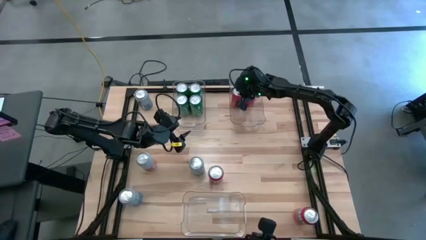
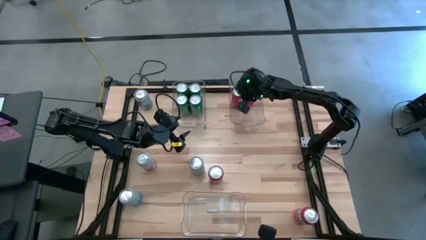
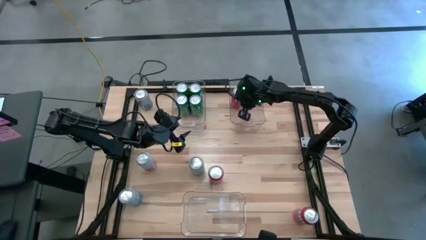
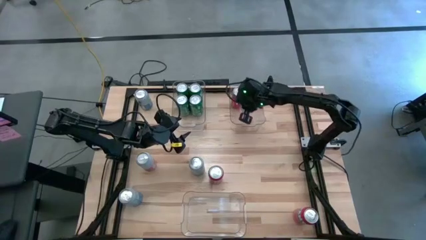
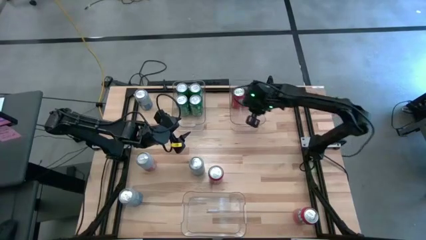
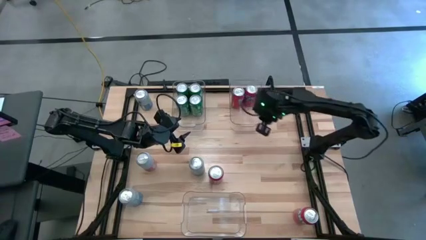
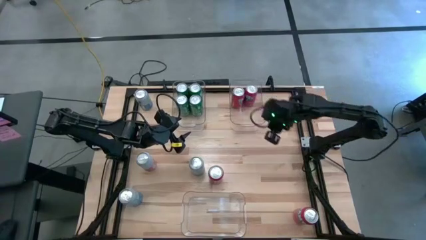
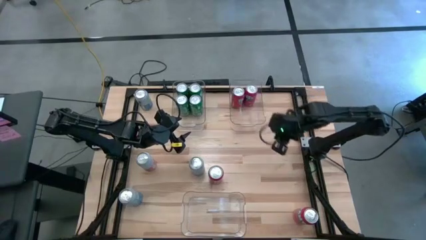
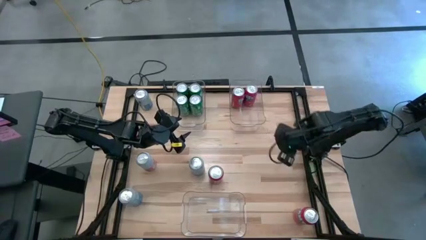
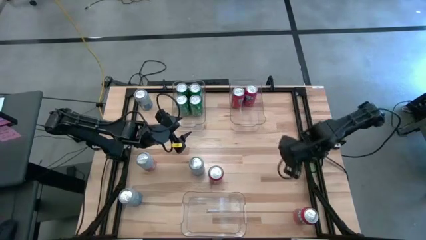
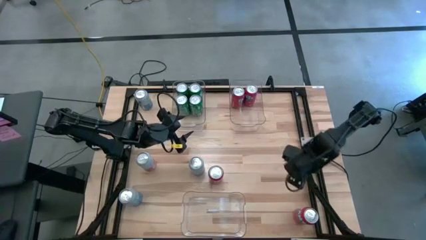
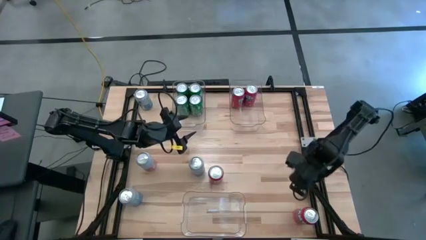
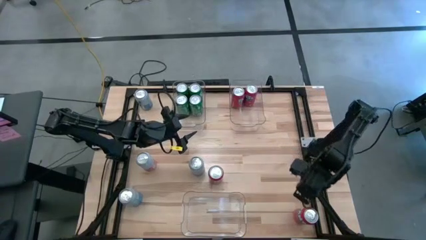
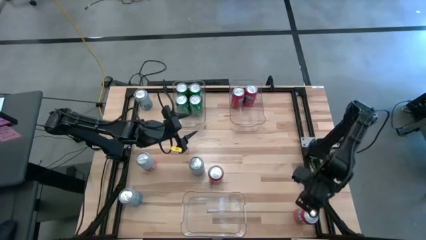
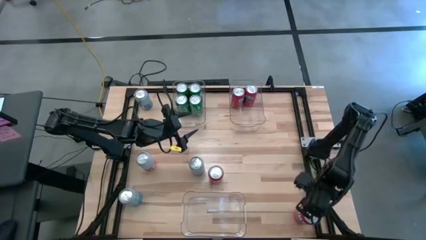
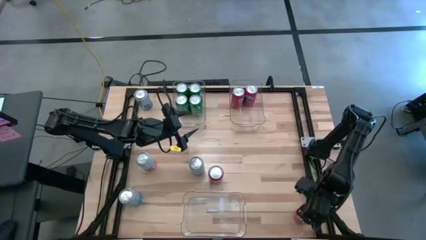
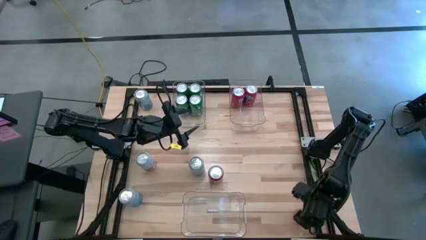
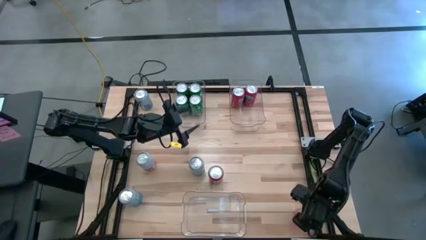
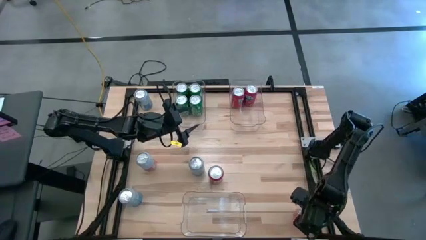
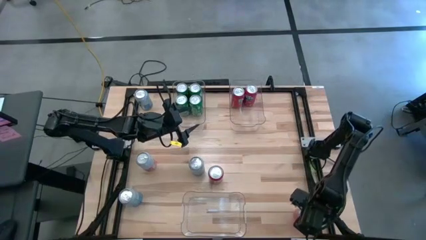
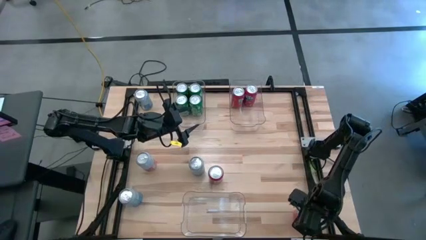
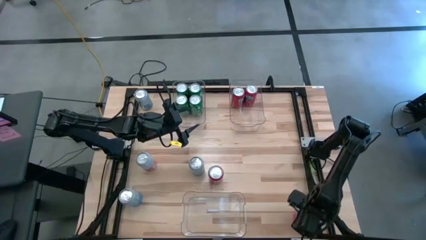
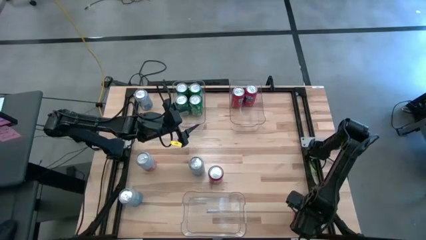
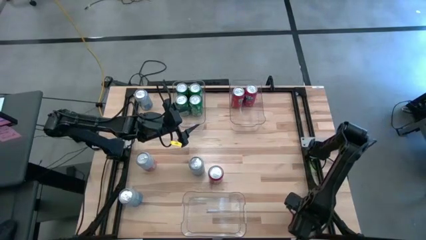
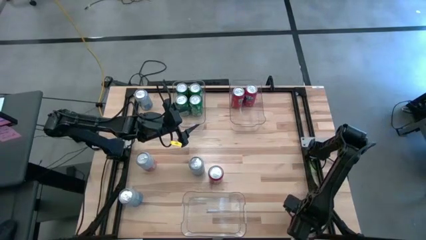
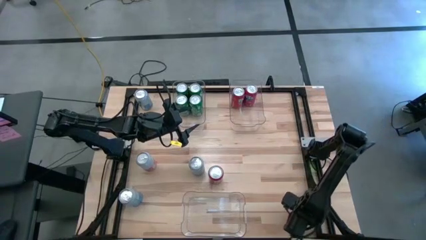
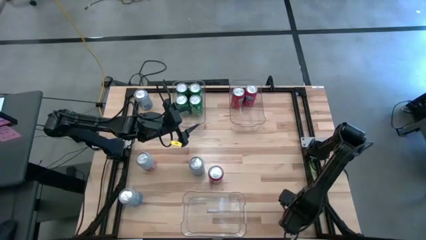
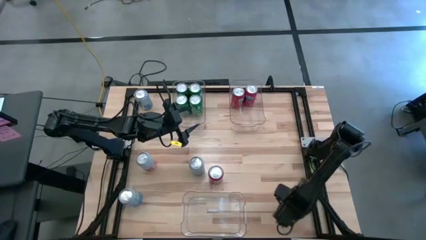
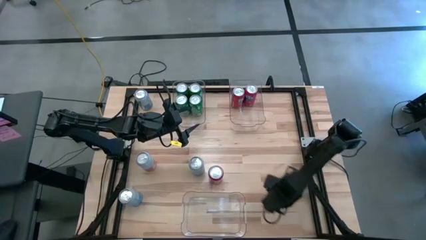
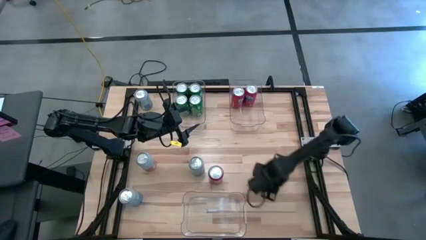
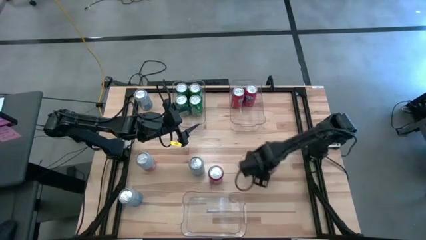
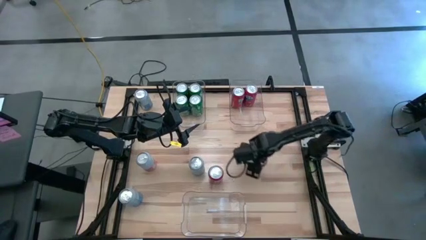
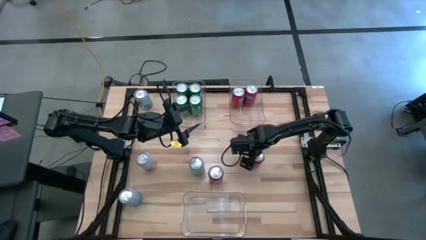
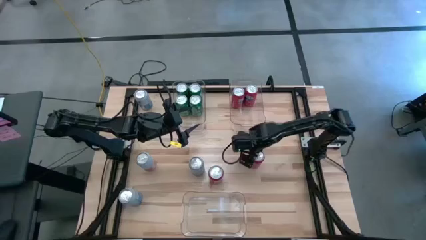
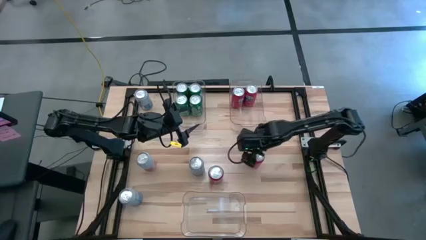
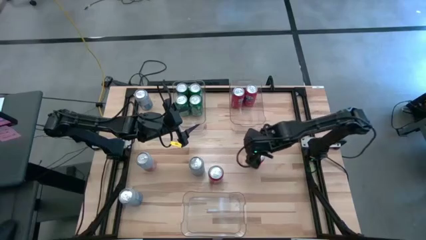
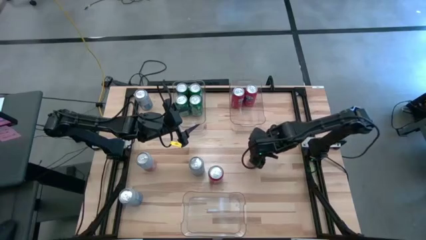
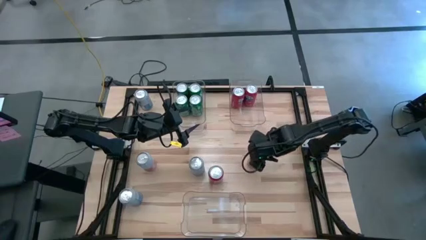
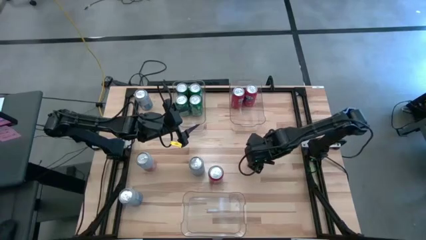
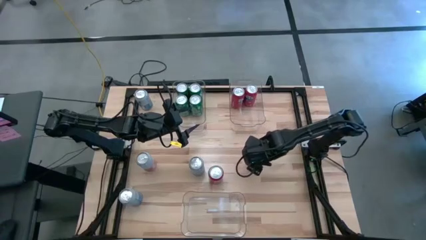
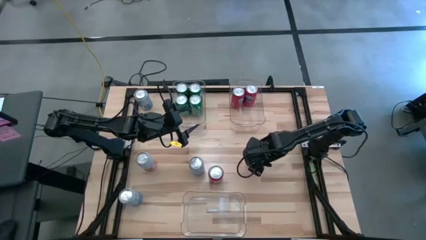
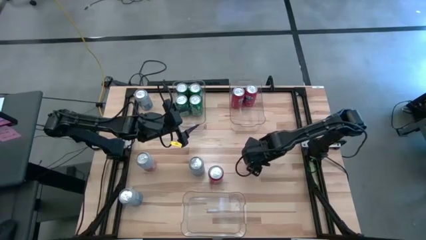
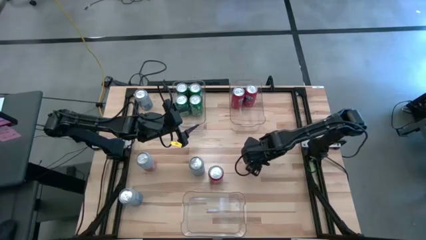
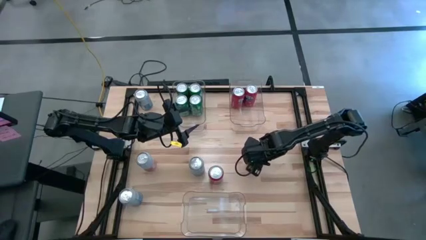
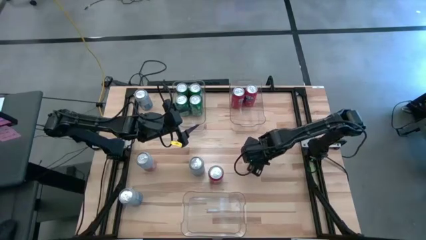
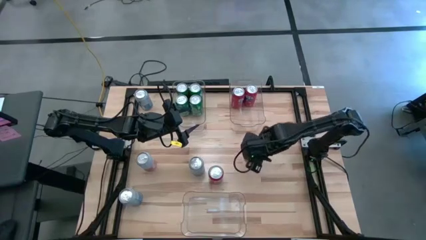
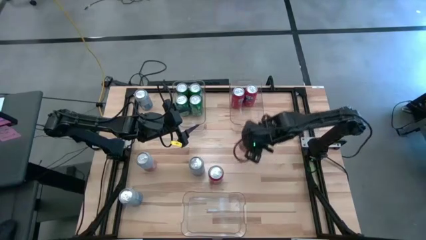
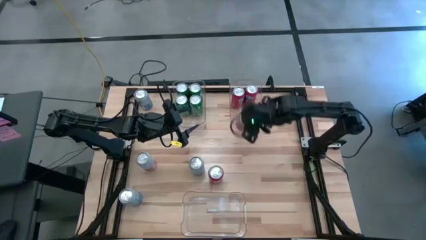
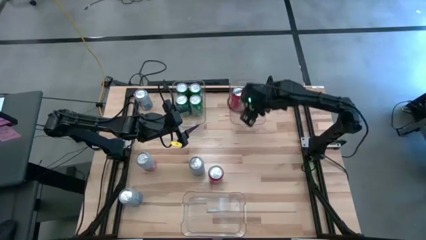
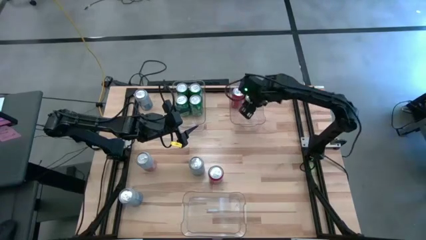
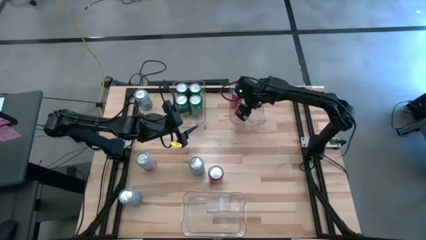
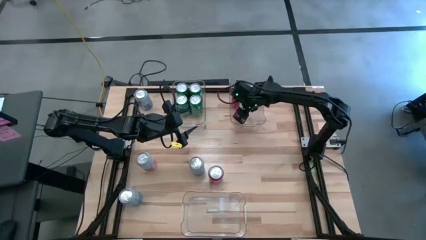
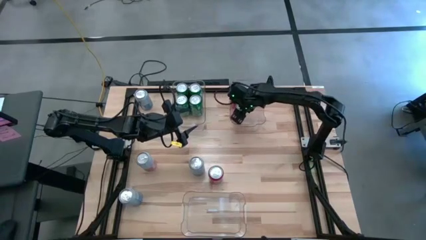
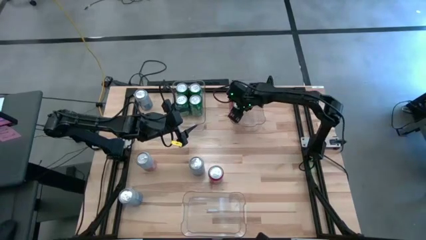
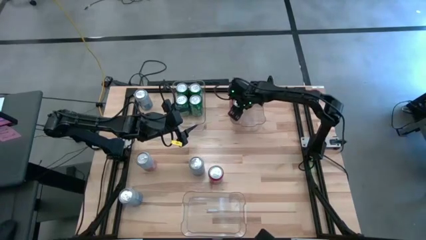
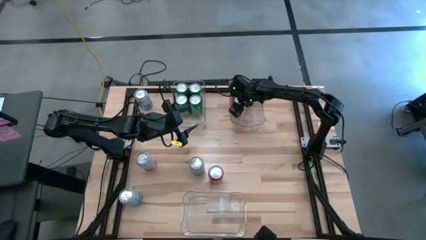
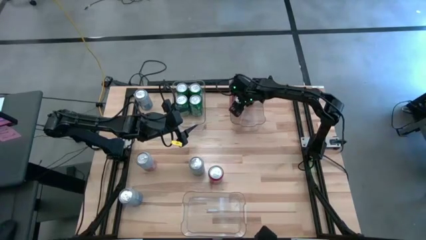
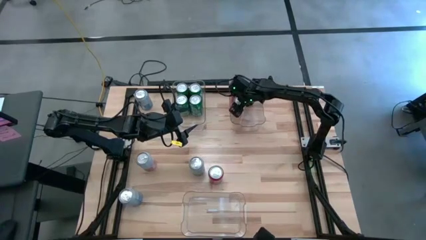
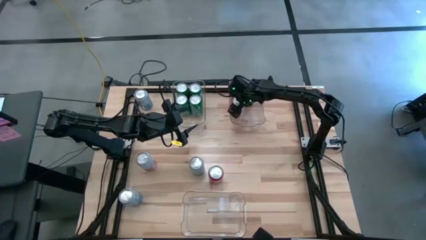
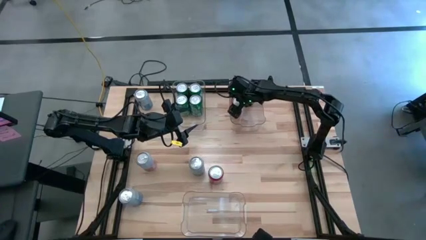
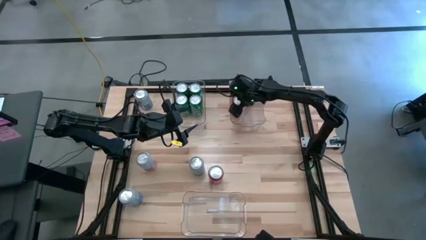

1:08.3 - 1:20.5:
Task: Sort soda cans
Put the red soda can into the top right transparent bin

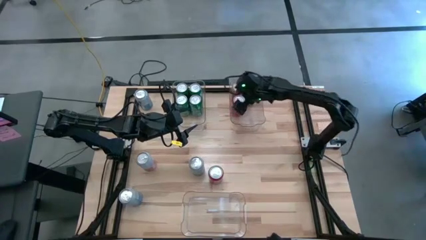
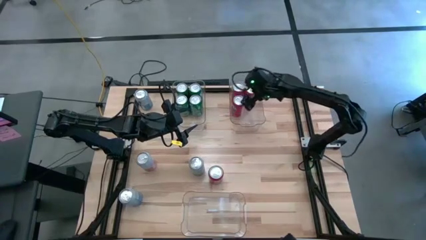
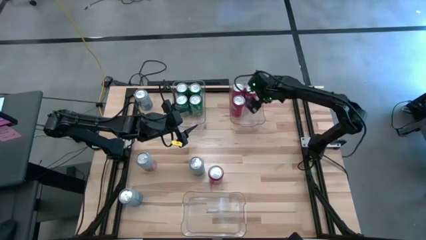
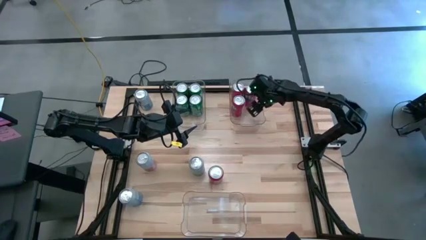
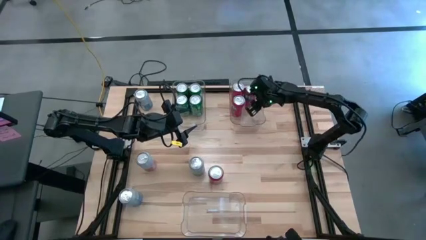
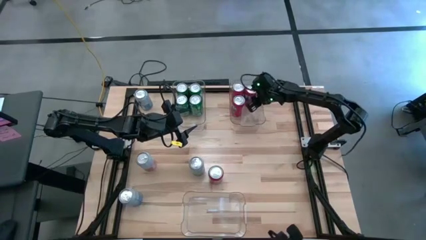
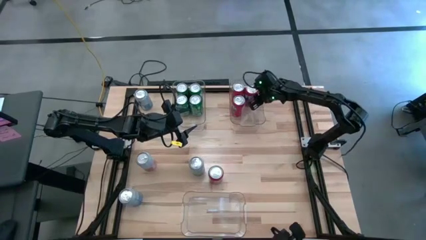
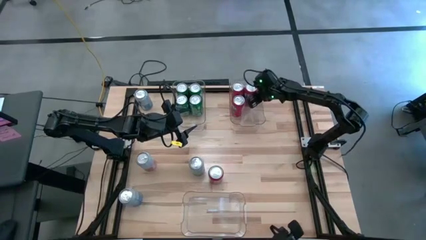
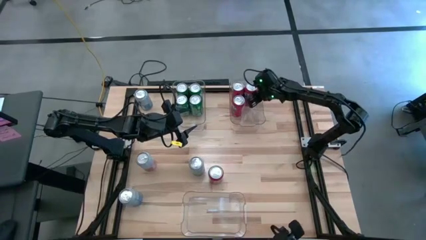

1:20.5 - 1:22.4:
Adjust the red soda can in the top right transparent bin
